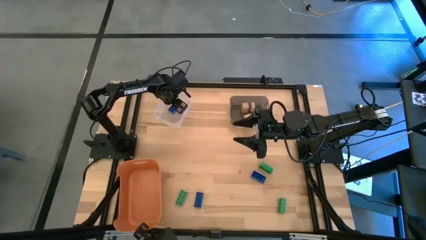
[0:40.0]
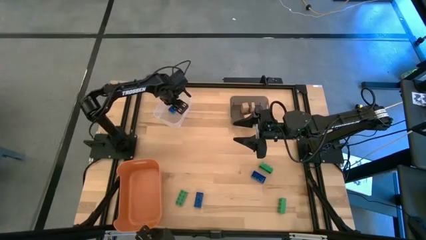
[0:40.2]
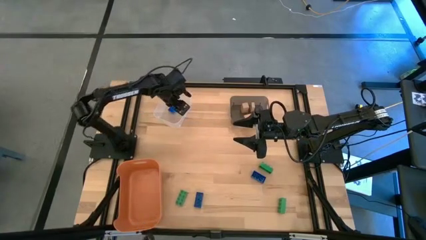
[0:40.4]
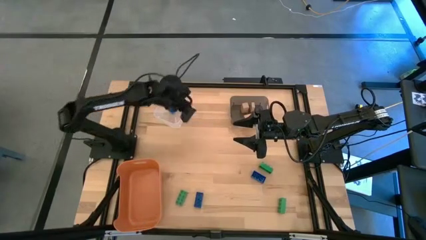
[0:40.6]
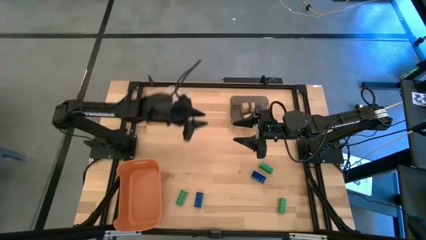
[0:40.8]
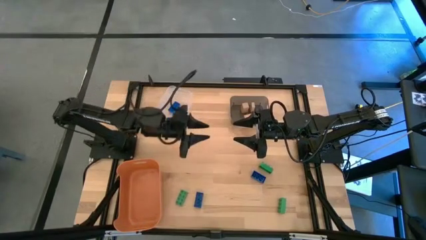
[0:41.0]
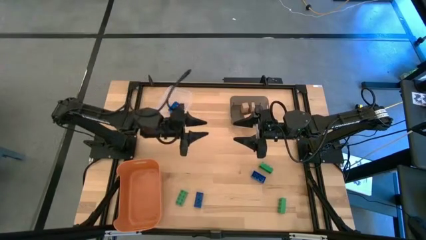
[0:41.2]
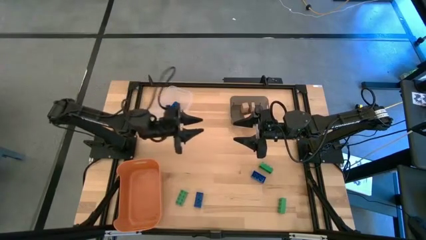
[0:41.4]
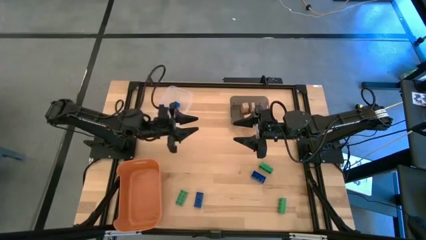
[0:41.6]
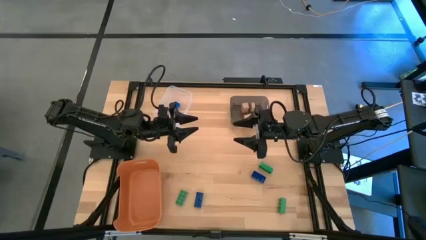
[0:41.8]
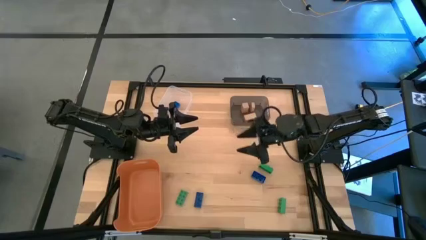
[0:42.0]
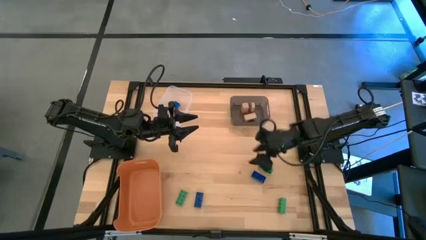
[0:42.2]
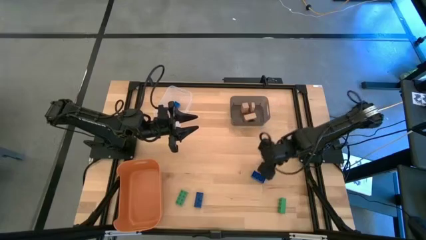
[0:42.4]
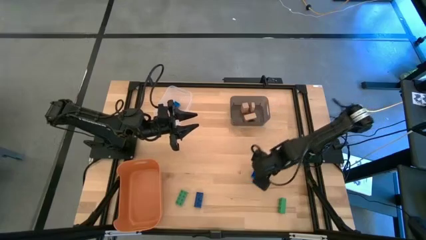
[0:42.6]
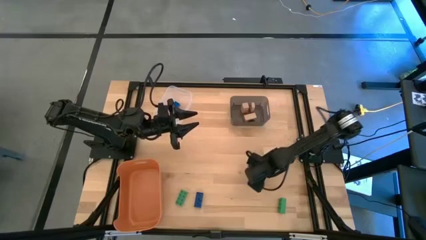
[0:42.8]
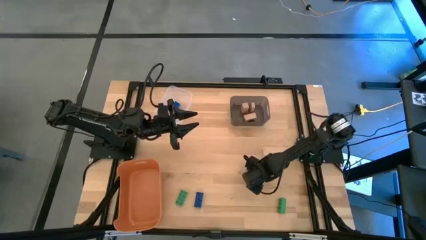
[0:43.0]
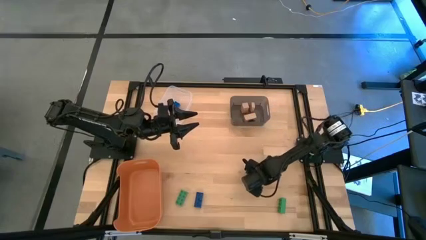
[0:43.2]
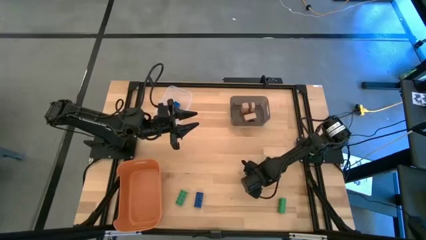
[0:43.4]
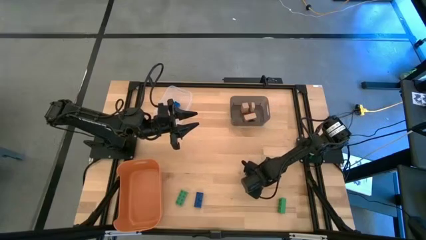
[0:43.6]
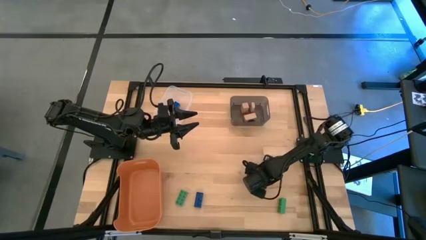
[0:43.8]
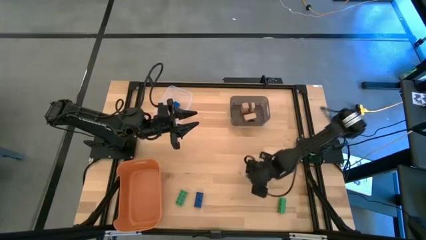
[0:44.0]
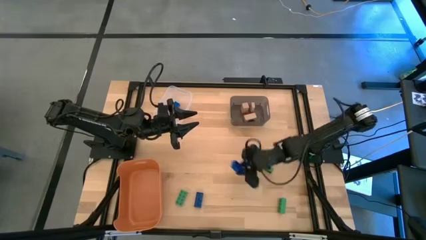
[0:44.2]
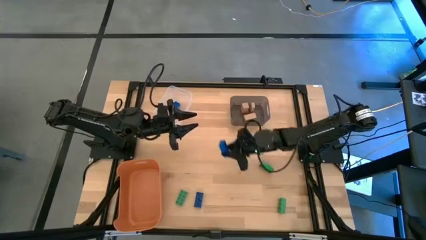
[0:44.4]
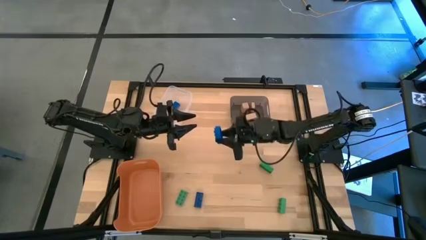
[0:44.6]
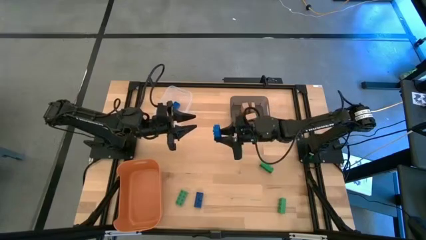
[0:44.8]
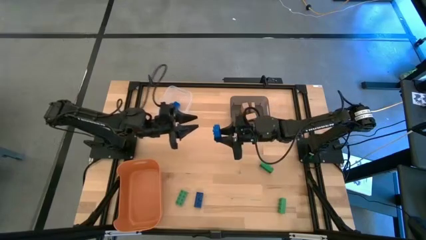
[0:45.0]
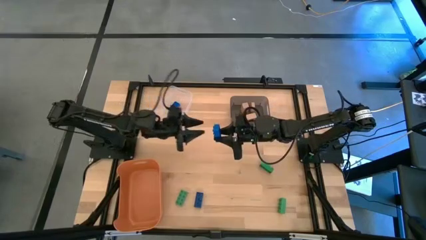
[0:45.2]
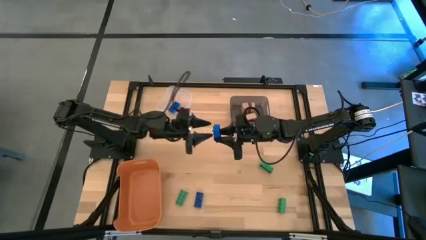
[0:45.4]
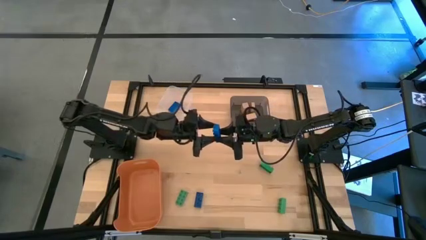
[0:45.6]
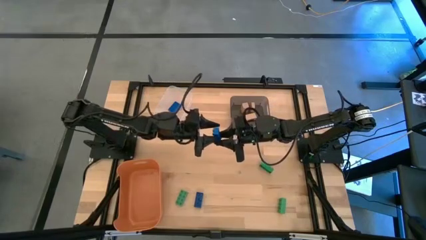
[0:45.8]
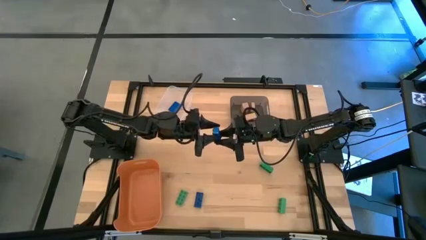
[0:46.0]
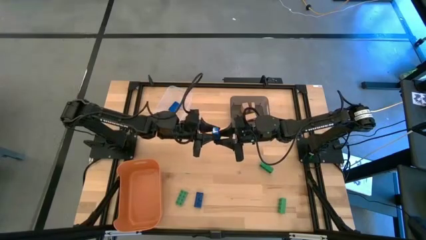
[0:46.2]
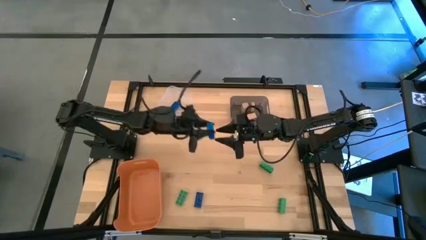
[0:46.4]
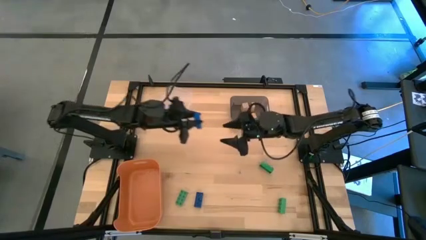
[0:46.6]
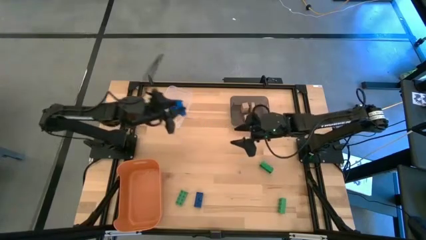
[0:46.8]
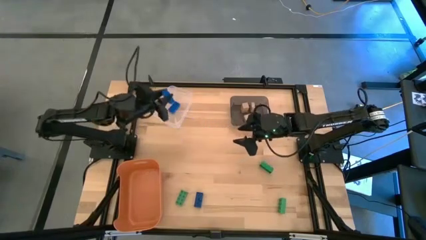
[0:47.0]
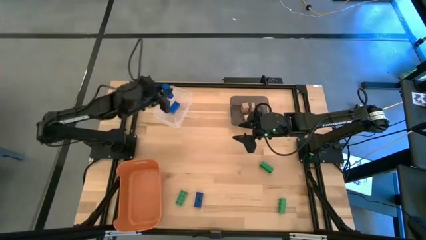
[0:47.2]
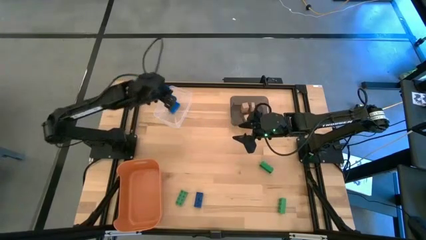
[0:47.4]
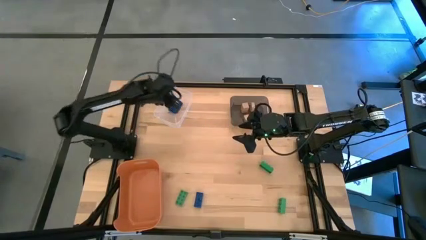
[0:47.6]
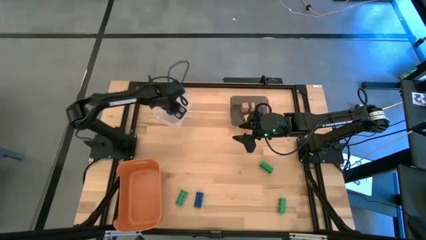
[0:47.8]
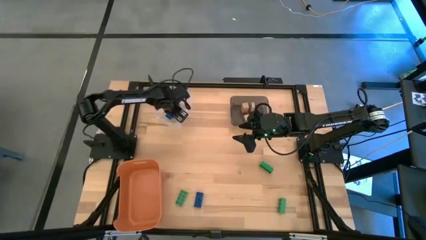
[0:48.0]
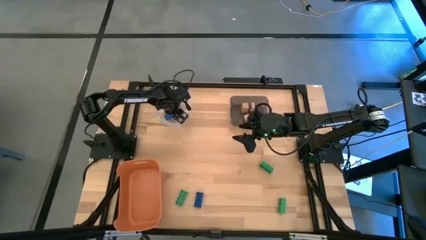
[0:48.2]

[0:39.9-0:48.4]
Task: Sort & place blocks by color
Put the right blue game piece into the transparent bin

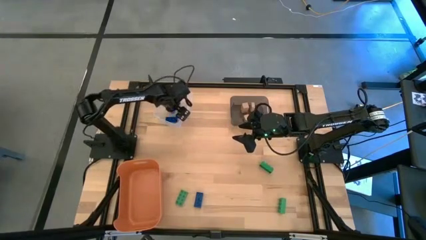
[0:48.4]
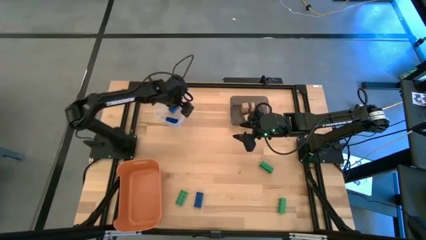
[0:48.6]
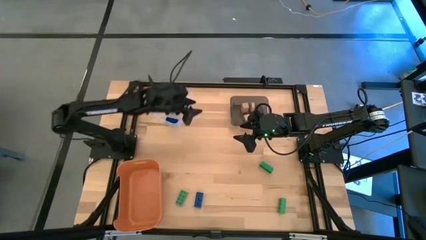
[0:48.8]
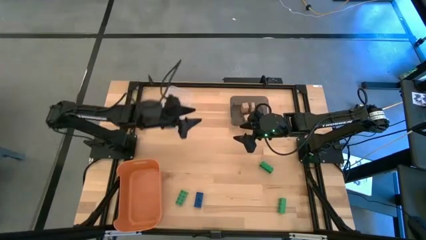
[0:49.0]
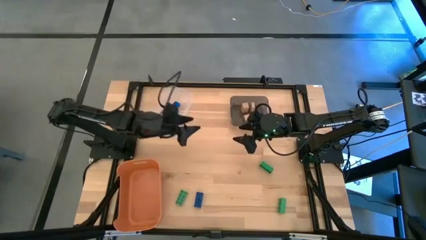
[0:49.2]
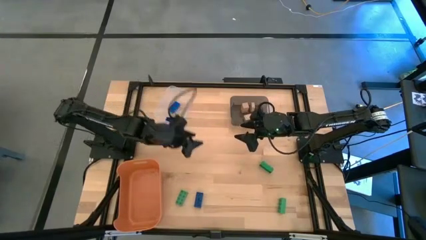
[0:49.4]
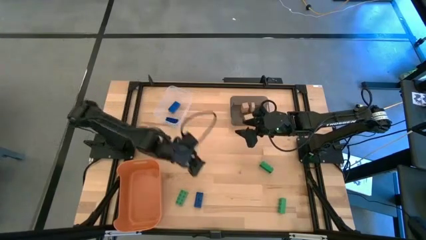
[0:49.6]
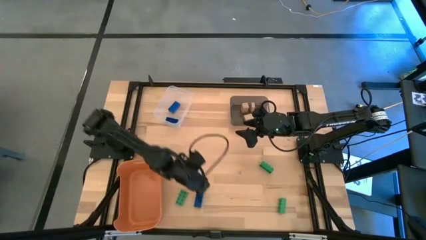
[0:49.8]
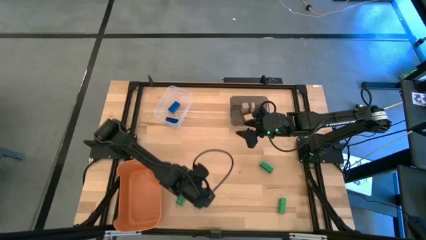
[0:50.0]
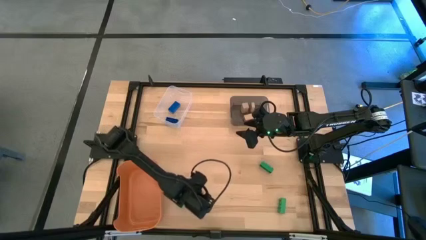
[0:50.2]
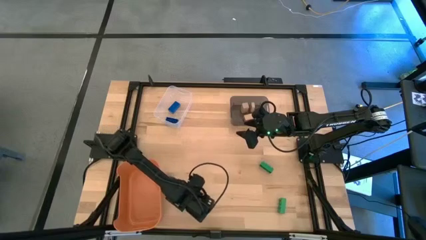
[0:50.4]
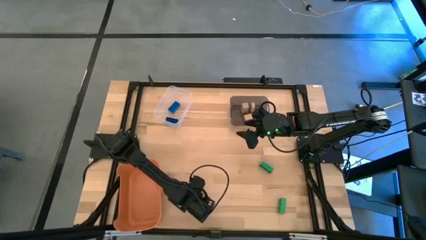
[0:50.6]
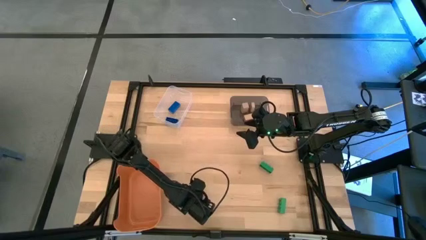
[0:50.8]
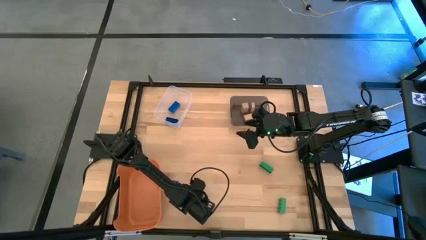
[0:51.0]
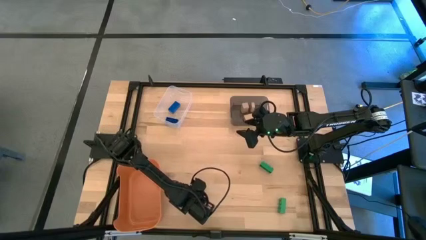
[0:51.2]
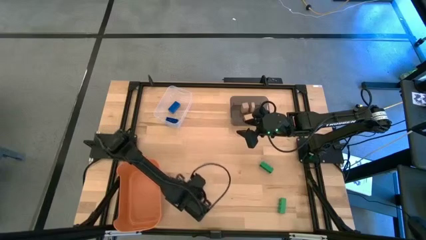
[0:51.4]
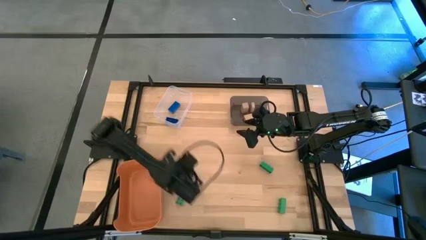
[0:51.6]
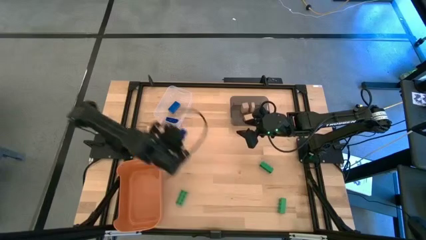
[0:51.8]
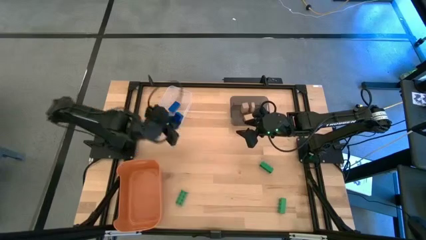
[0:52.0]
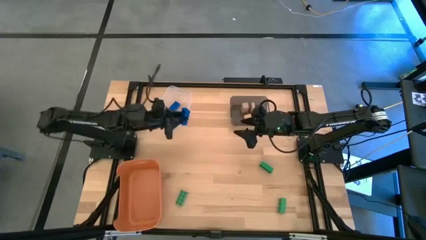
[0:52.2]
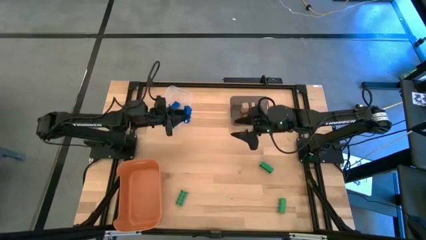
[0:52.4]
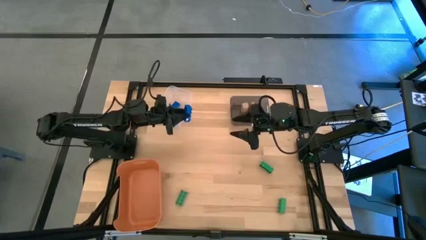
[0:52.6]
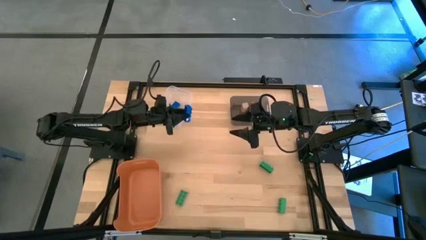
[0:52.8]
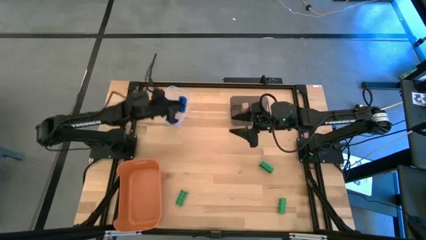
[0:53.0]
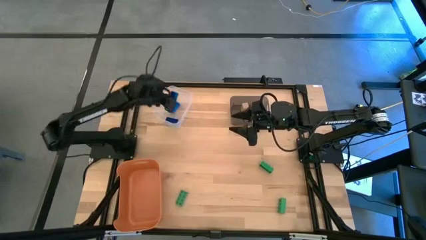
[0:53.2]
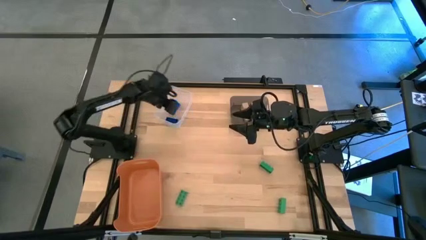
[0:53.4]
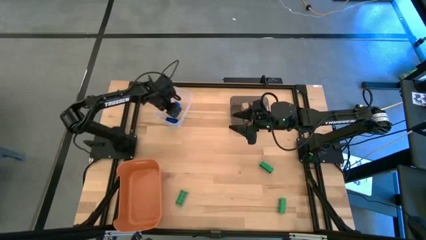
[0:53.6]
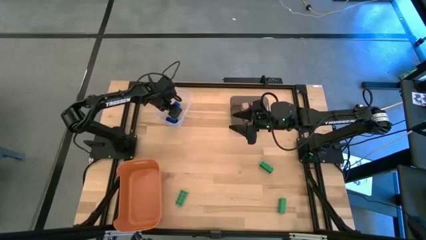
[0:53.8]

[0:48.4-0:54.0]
Put the blue game piece into the transparent bin

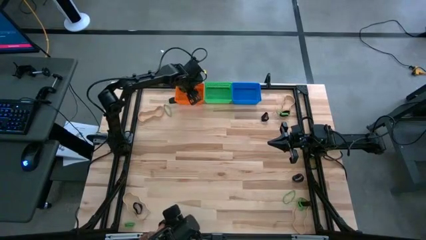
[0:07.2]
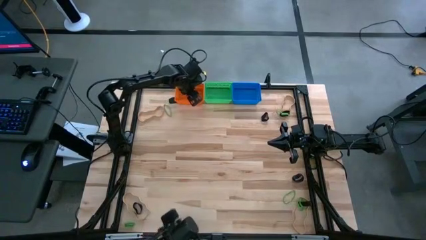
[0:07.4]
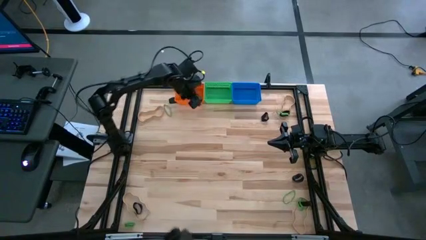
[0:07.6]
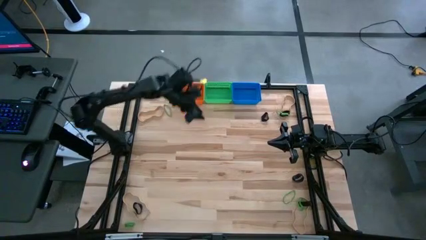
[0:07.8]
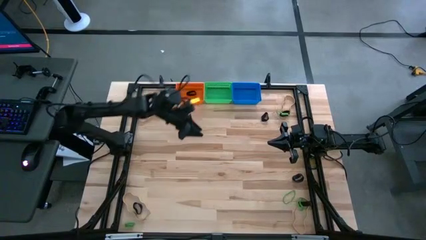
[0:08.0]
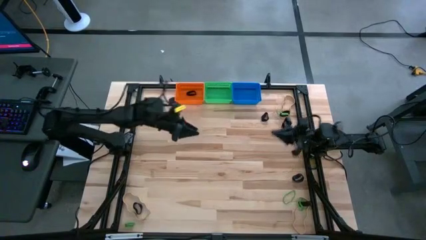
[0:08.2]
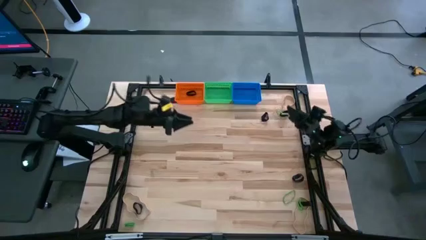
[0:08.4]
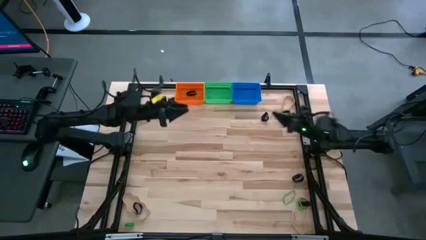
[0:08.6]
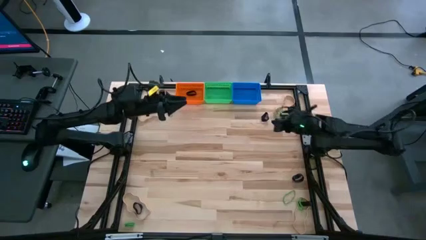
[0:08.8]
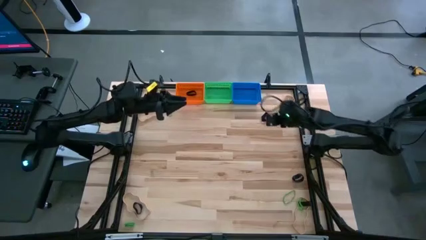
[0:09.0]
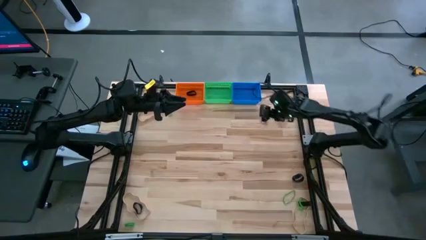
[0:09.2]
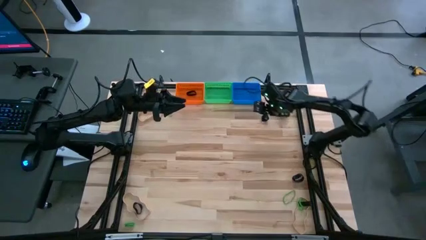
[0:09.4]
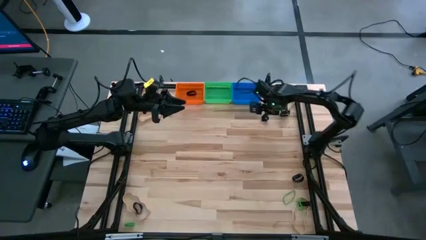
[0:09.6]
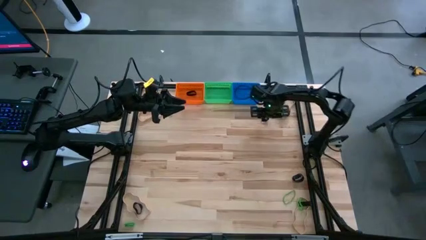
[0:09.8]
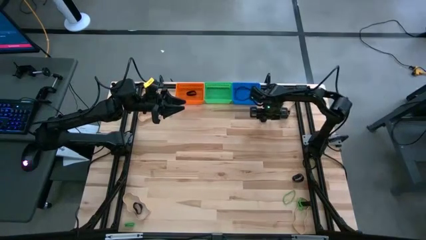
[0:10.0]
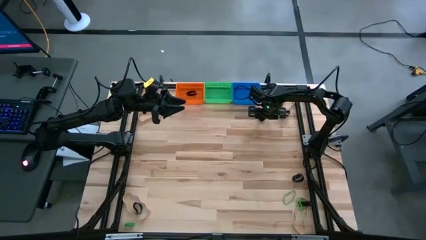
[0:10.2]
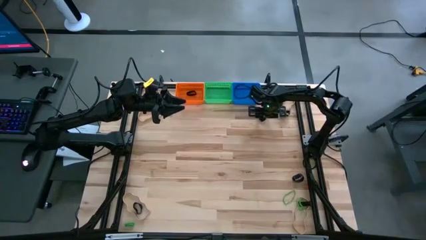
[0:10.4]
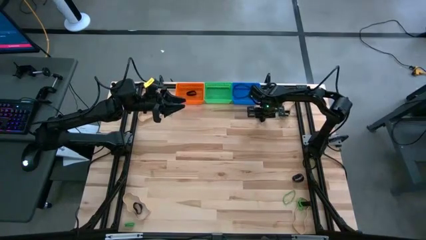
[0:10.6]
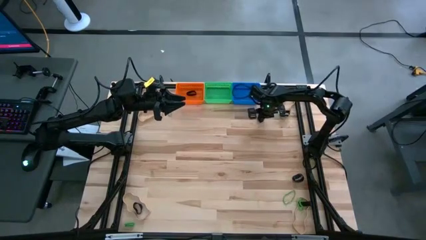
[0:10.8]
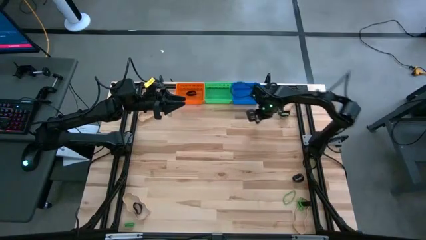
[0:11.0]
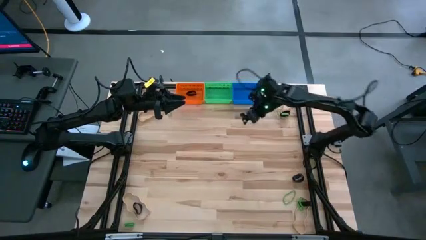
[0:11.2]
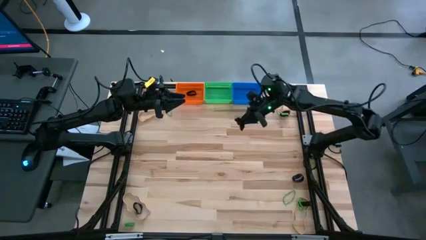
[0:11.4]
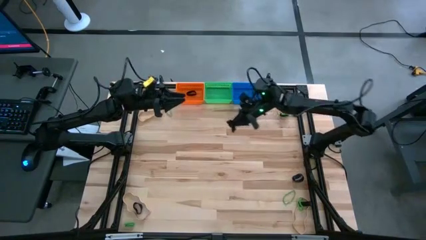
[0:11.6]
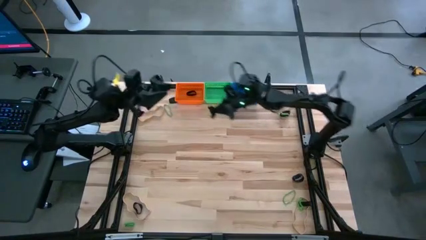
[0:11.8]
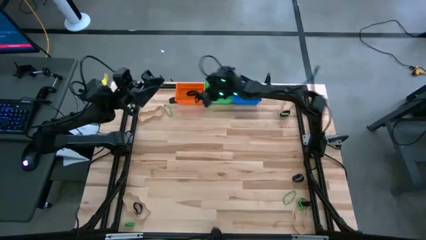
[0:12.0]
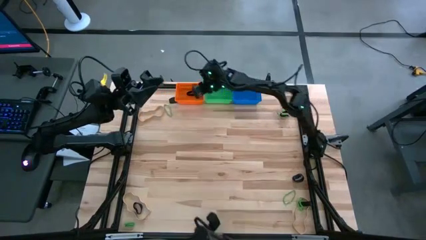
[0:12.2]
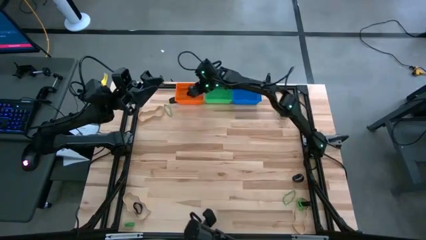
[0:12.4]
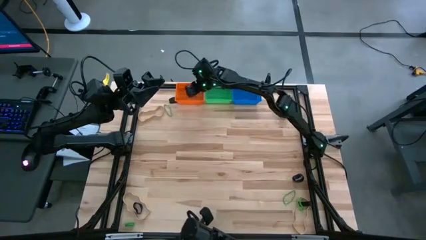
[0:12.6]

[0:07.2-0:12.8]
Task: Sort rubber bands into baskets
Put the black rubber band into the orange basket
